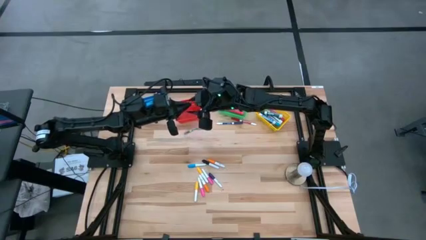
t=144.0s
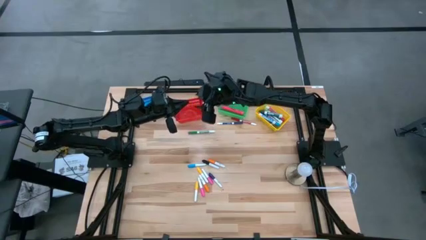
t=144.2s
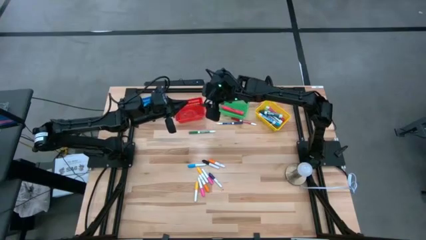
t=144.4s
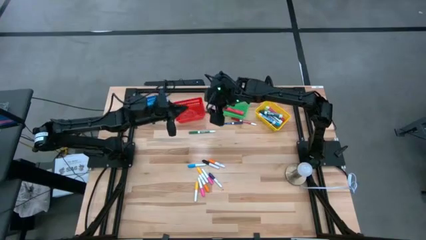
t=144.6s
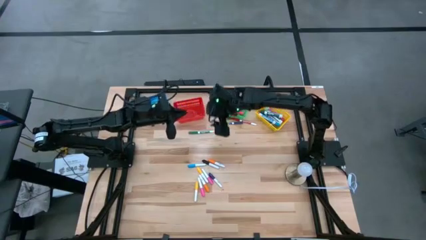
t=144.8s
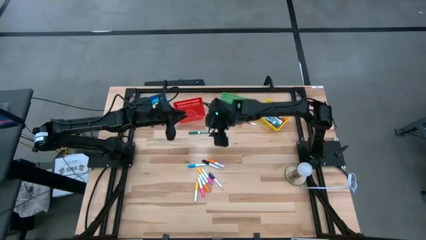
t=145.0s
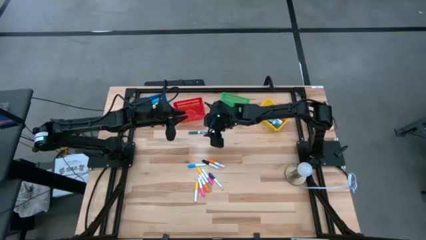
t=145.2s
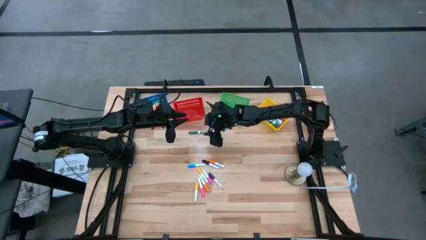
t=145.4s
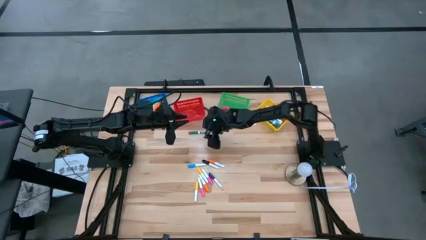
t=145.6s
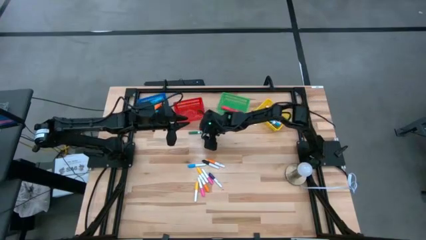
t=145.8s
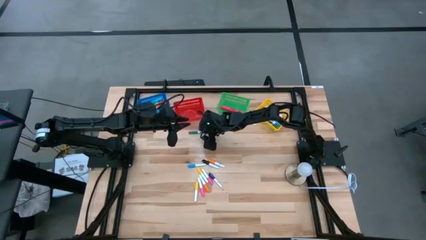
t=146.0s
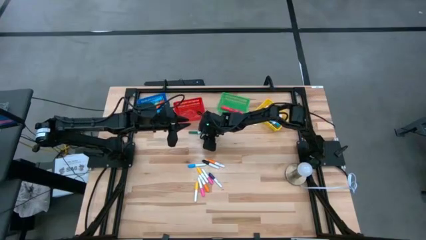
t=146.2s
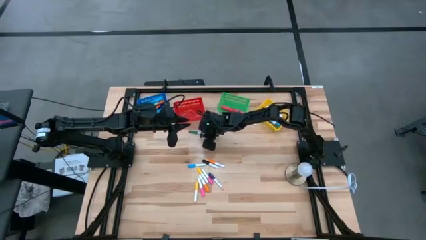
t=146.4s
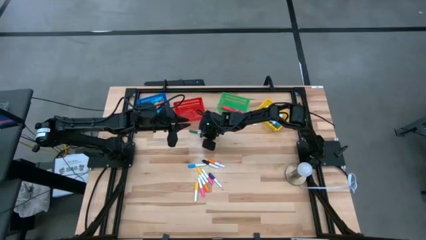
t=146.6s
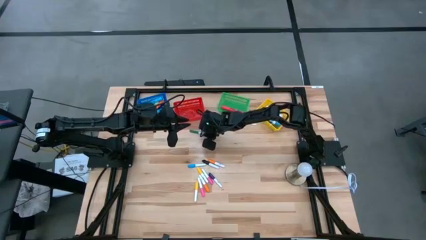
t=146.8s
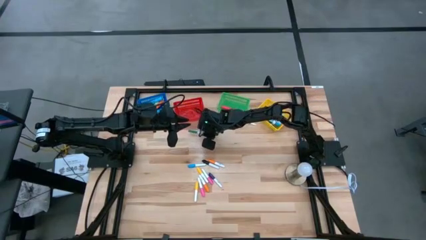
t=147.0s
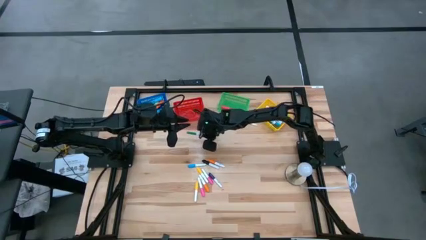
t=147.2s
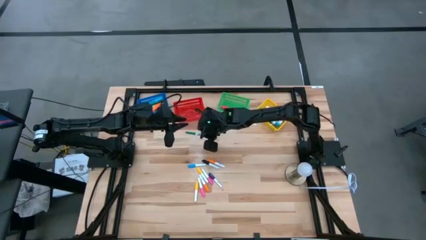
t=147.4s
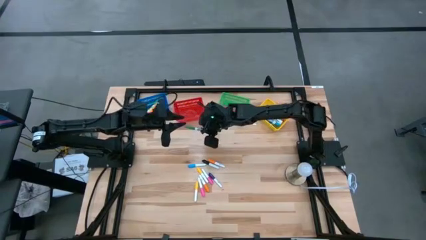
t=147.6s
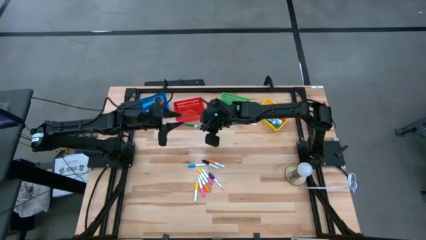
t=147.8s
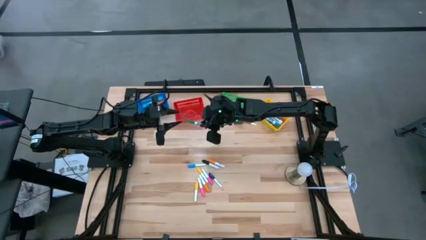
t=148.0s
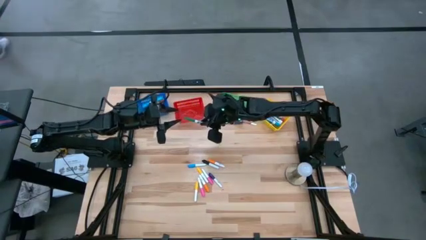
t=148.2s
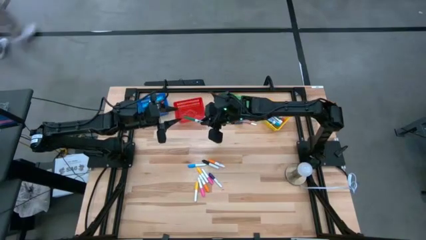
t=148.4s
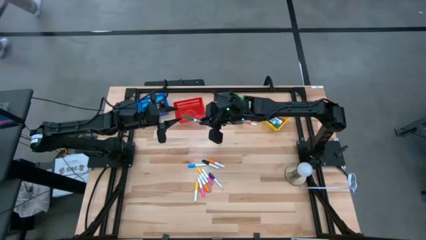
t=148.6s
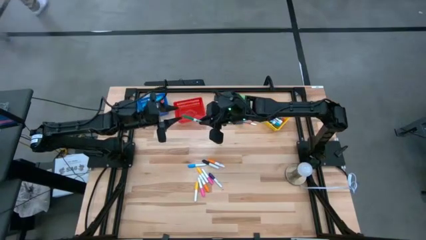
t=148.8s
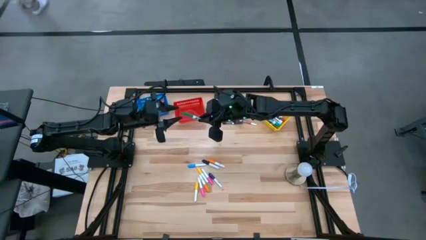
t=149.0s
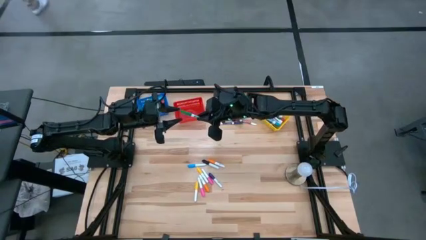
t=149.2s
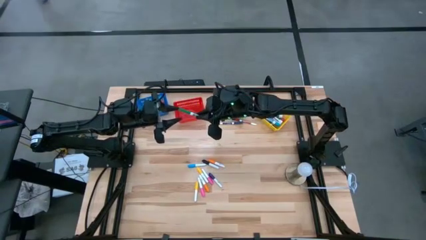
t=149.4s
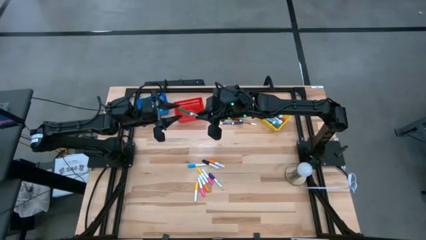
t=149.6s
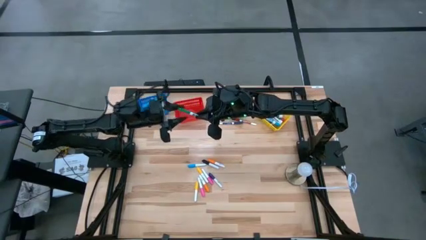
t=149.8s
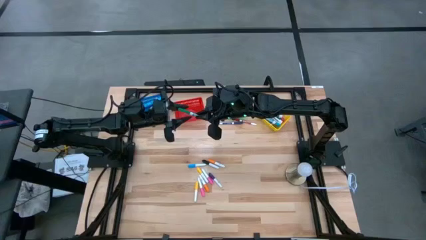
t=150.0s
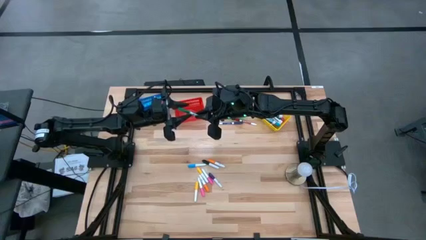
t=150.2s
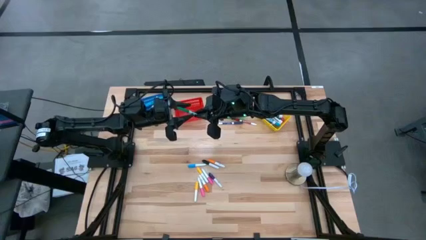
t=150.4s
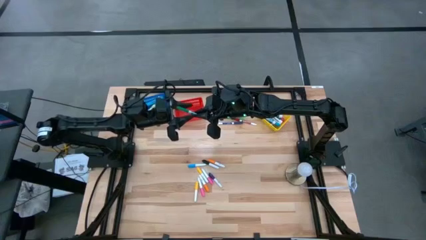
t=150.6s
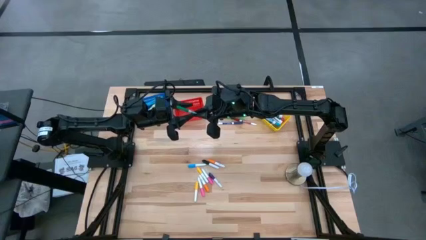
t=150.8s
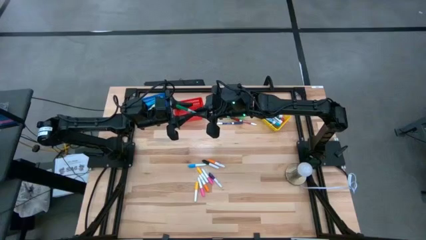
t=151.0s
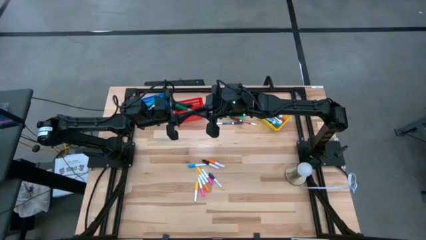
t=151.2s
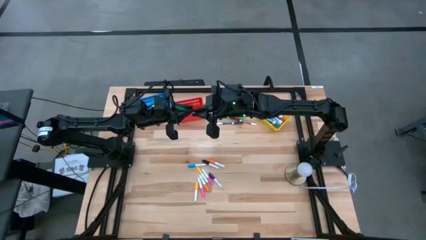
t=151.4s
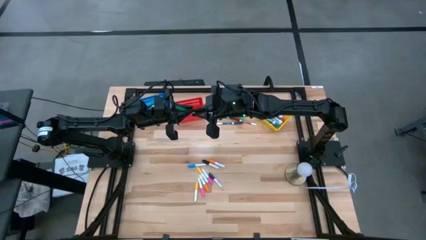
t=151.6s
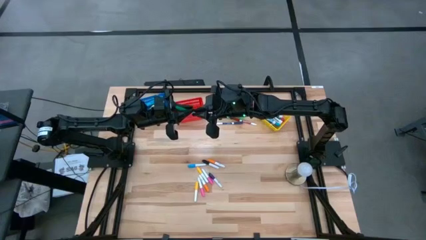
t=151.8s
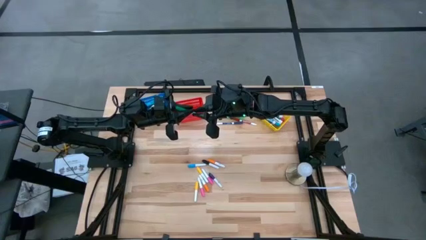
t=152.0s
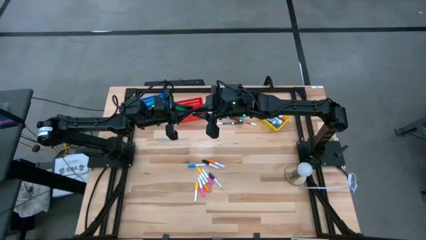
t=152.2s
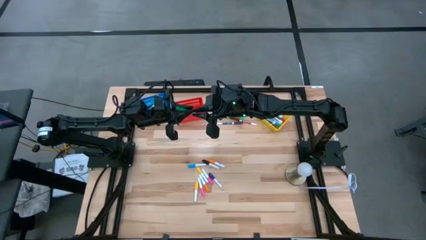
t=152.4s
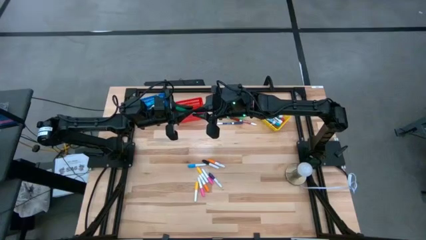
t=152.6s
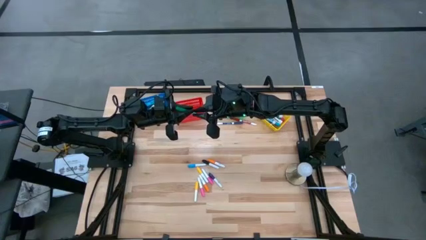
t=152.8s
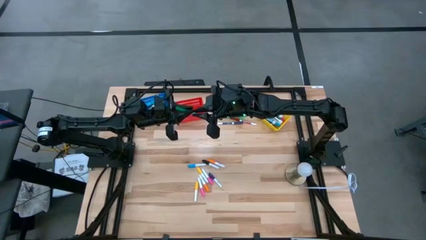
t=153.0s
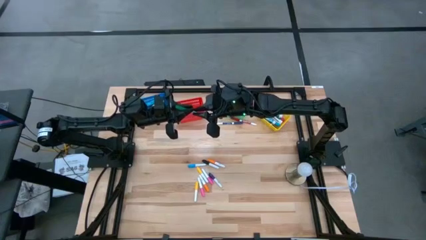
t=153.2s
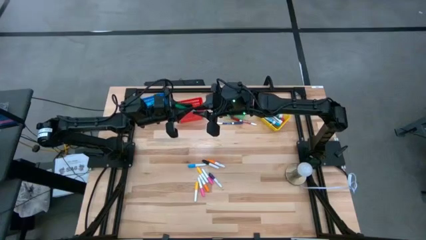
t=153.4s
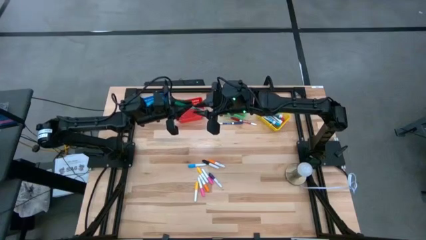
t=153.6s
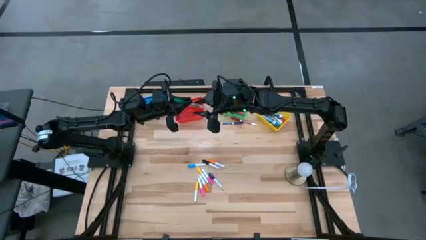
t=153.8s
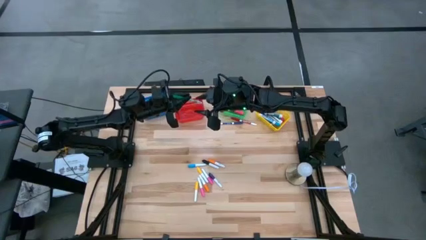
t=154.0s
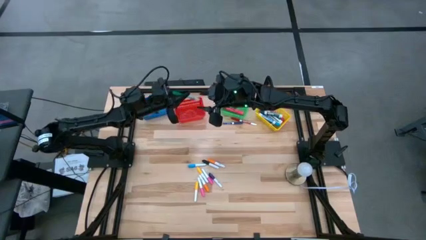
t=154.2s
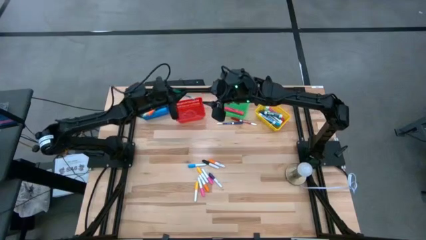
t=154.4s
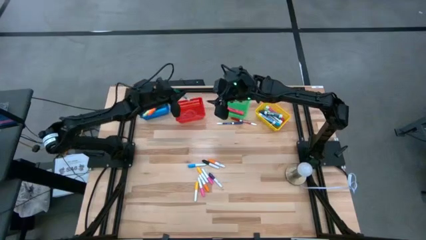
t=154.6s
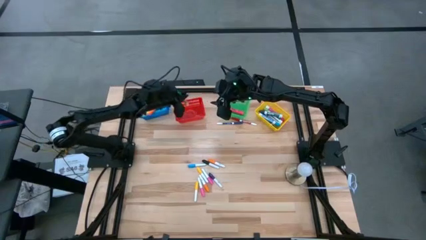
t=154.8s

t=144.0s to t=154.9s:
Task: Pick & Place Markers
Put the small green marker pen into the red bin

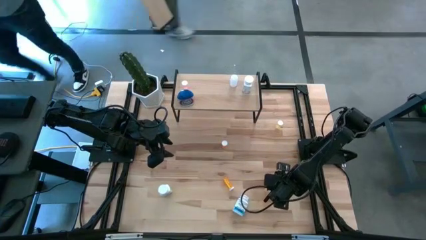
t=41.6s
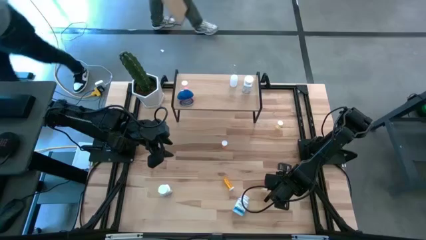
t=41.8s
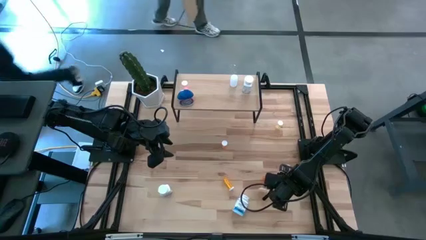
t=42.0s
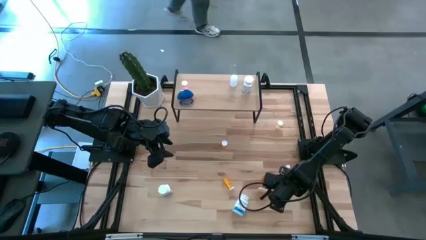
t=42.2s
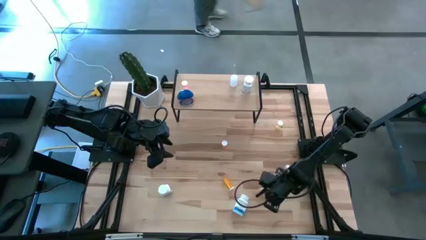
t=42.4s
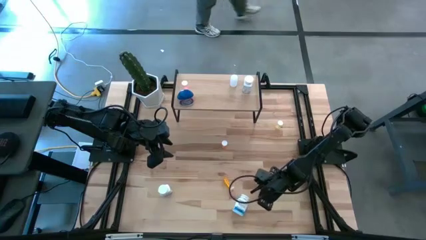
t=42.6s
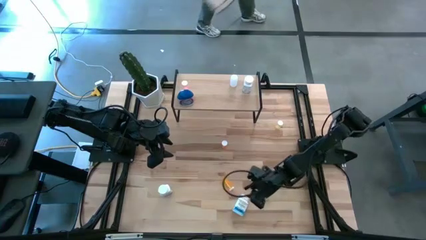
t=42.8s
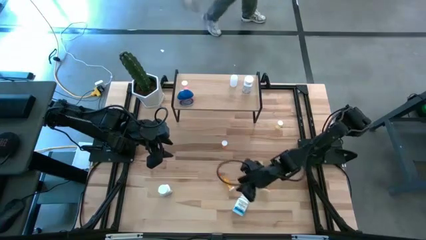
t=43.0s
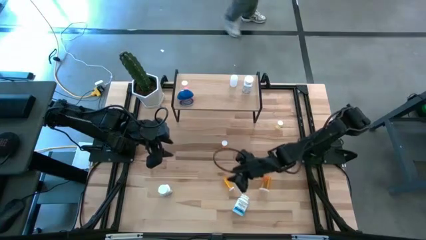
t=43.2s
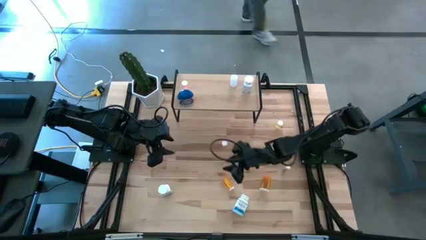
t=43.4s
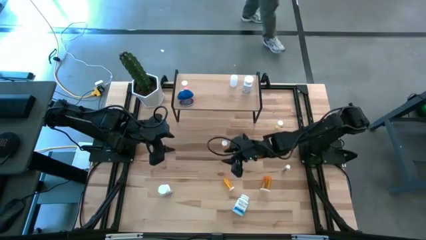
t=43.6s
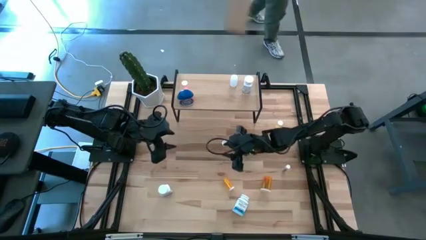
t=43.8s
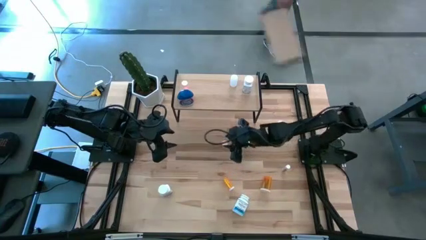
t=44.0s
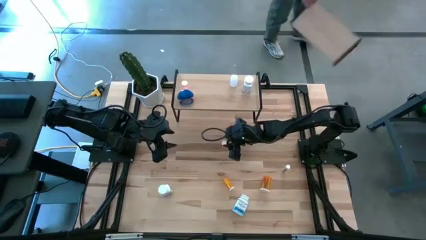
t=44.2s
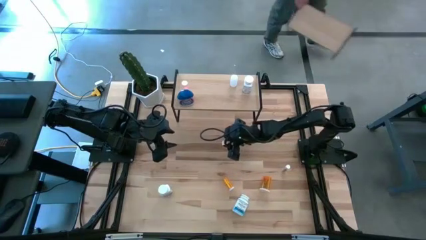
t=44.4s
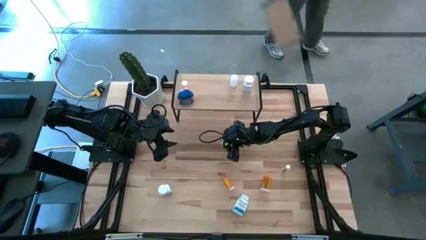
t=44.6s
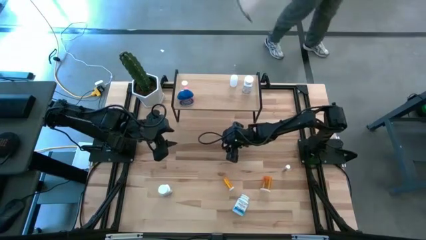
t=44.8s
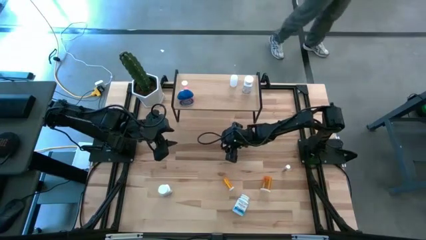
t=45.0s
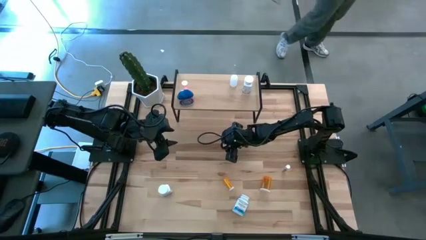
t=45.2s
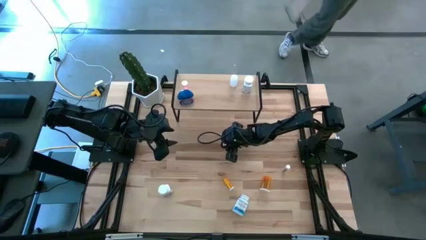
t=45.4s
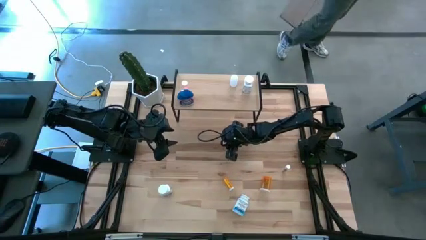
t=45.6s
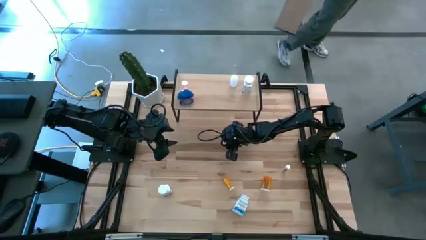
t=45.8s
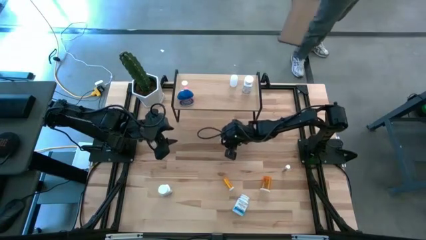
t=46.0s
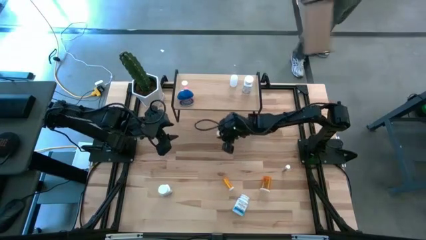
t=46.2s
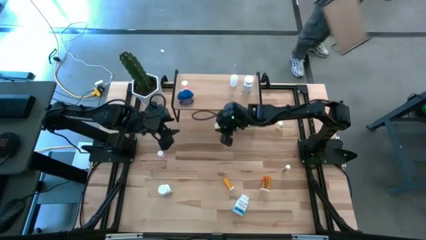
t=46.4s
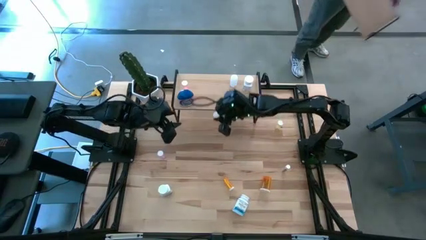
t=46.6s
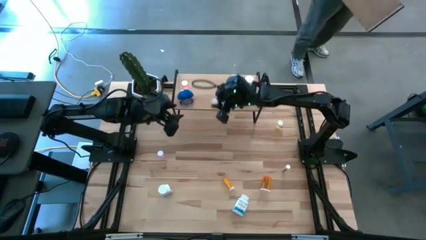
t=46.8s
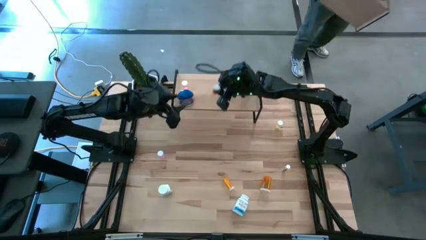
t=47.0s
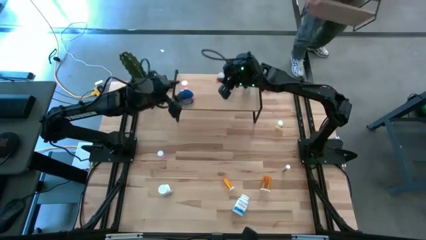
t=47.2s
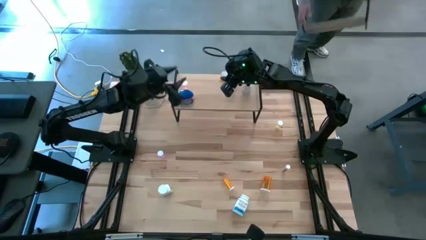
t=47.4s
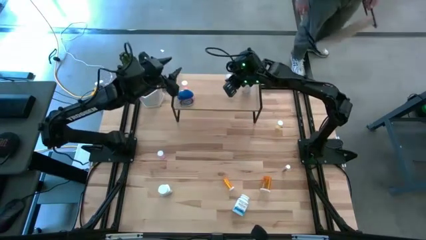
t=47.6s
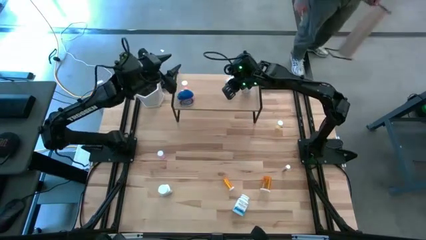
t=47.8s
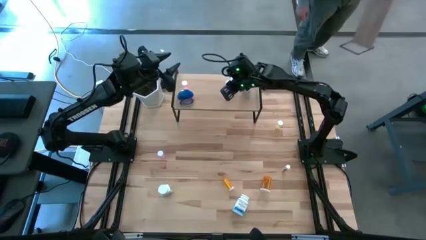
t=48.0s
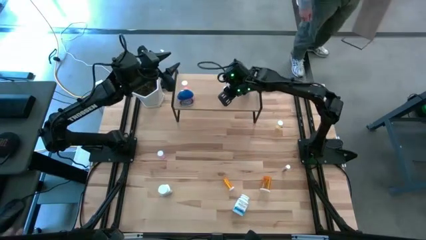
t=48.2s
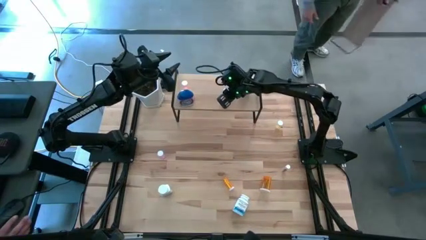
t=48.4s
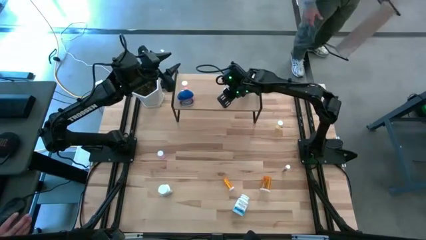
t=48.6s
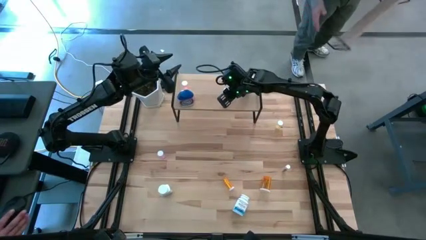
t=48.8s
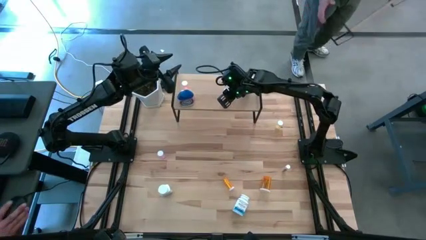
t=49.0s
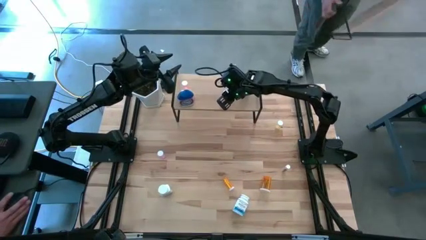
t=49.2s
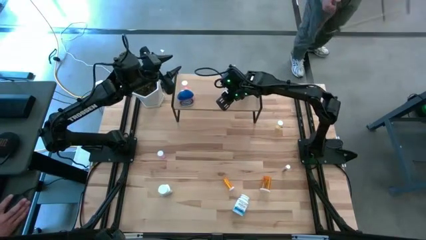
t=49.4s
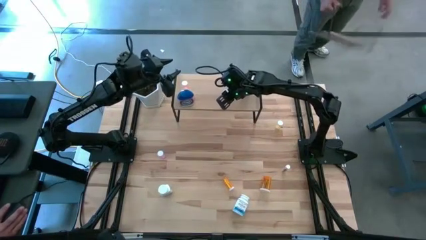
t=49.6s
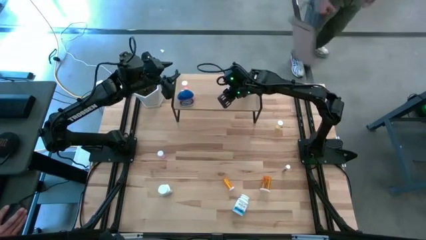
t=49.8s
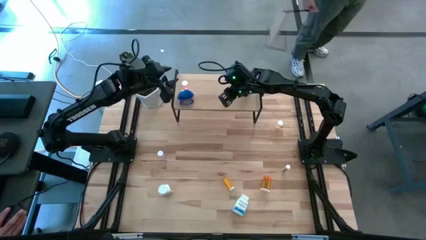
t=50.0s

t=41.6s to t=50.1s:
Task: Pick and place medicine bottles onto shelf by color
Put the orange small pill bottle on the shelf
